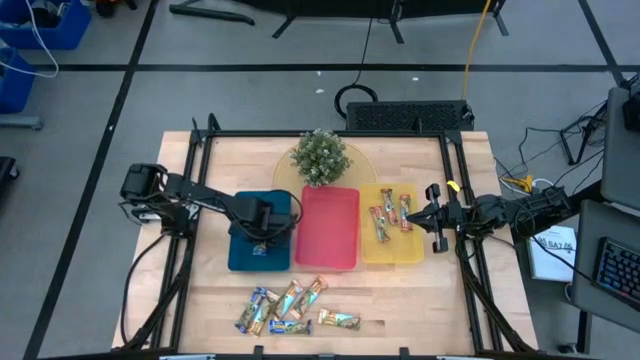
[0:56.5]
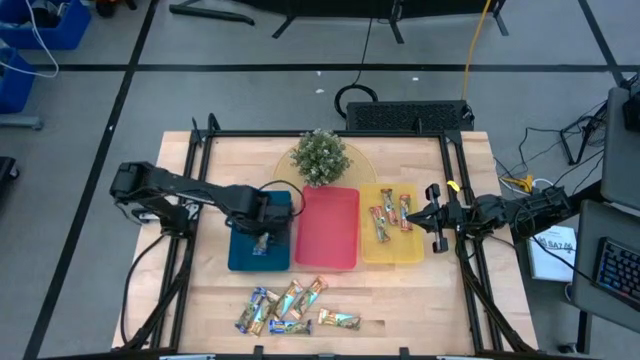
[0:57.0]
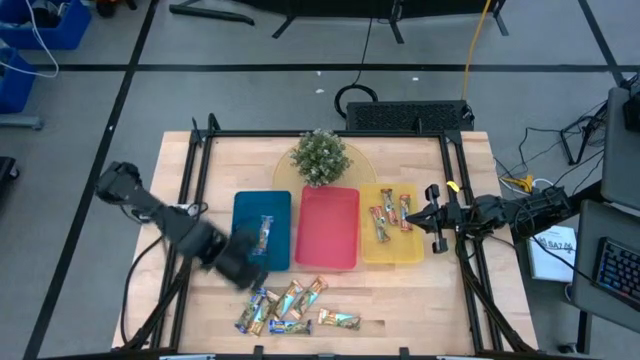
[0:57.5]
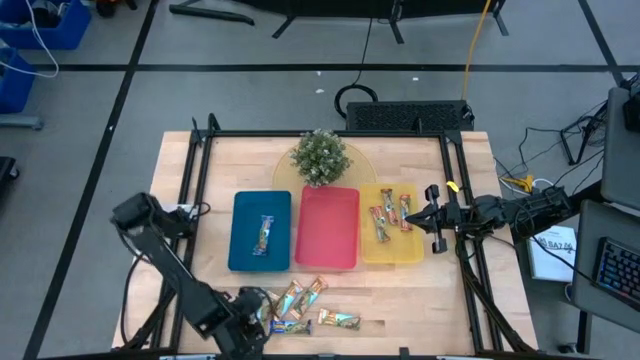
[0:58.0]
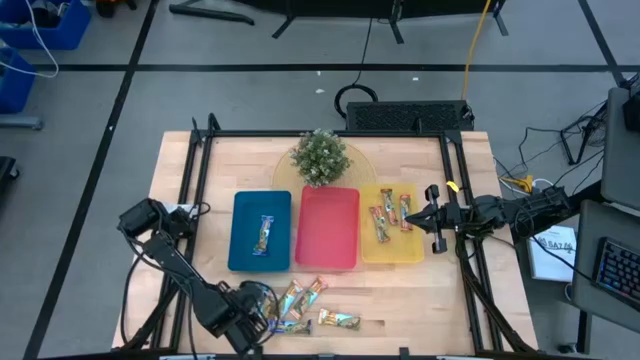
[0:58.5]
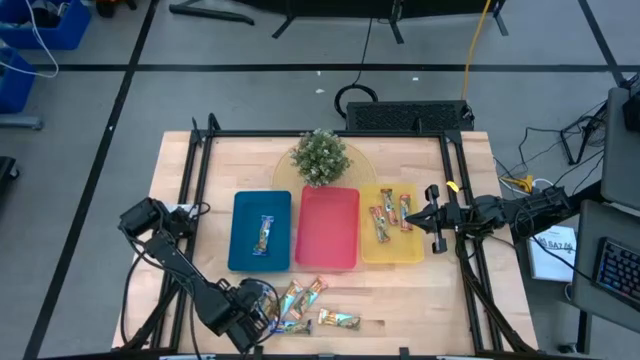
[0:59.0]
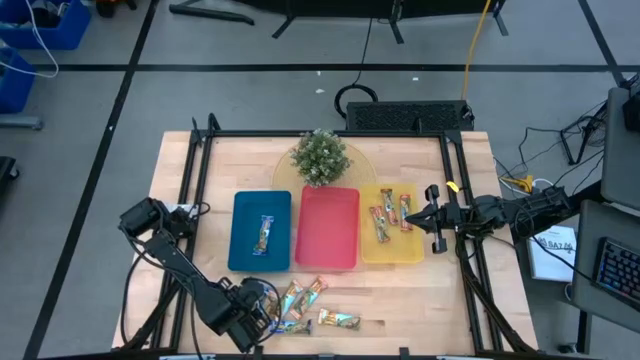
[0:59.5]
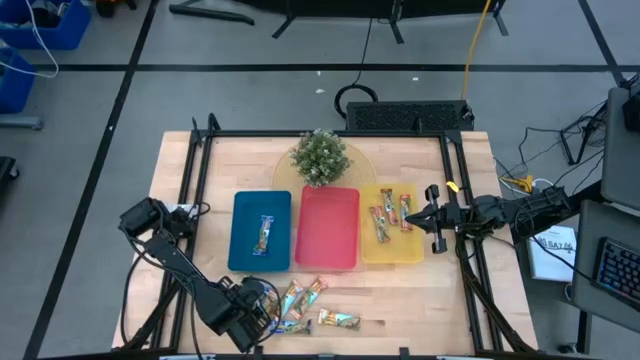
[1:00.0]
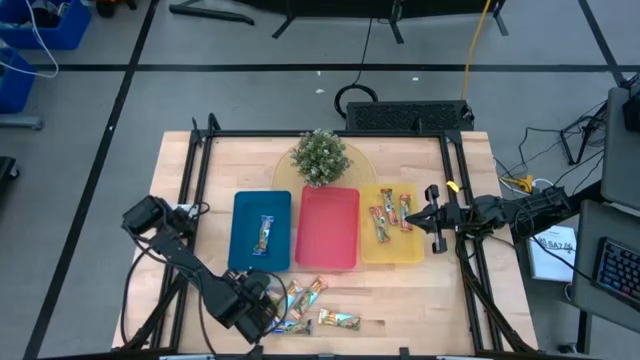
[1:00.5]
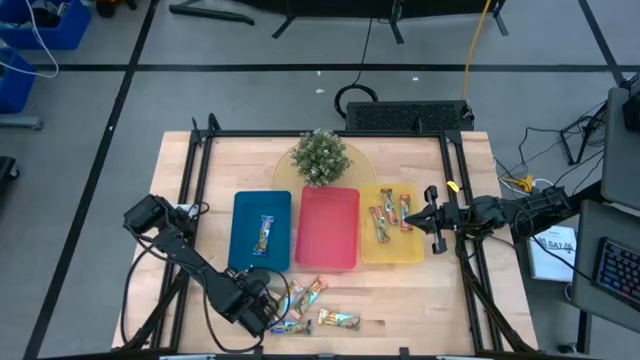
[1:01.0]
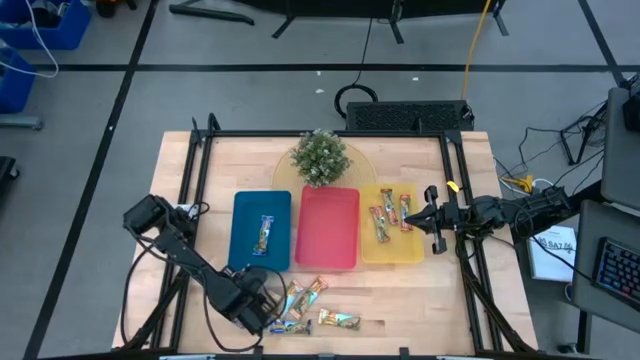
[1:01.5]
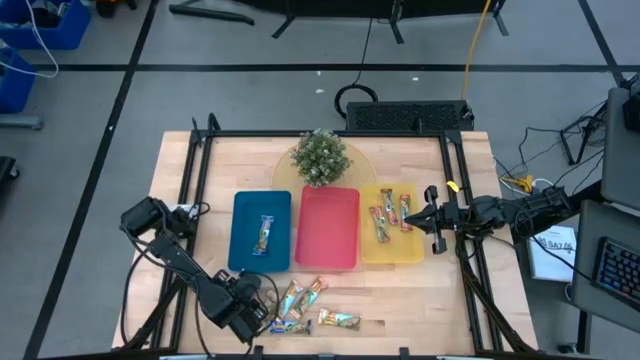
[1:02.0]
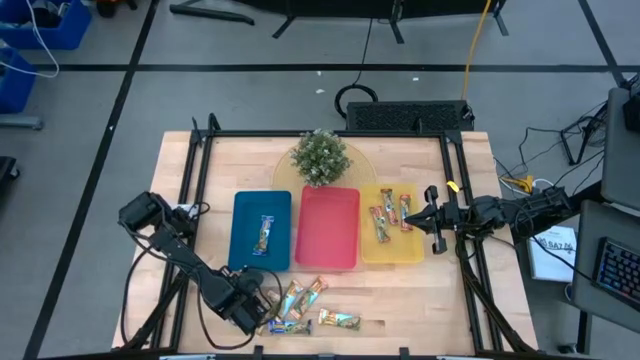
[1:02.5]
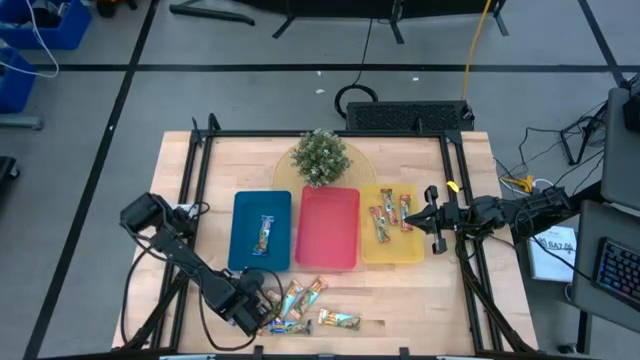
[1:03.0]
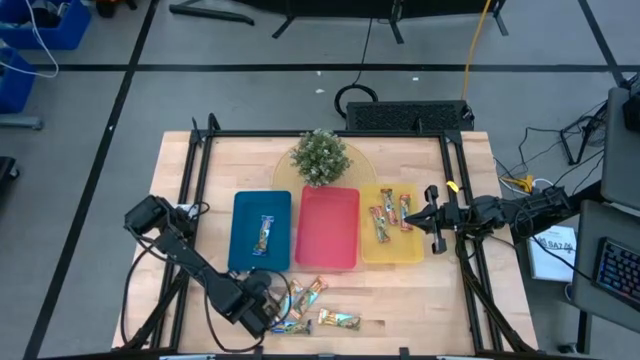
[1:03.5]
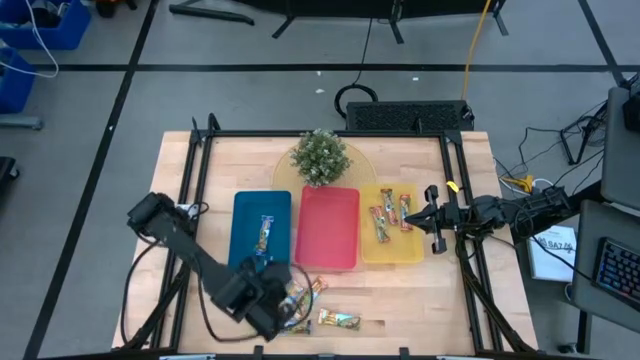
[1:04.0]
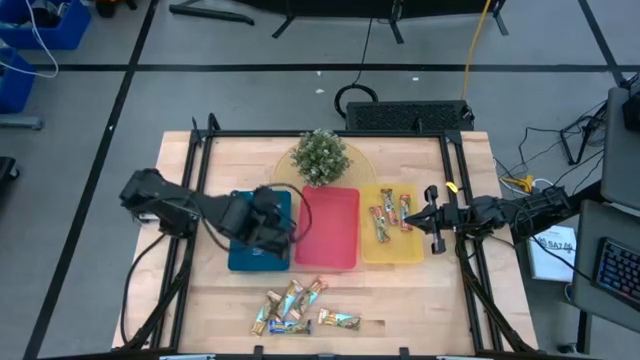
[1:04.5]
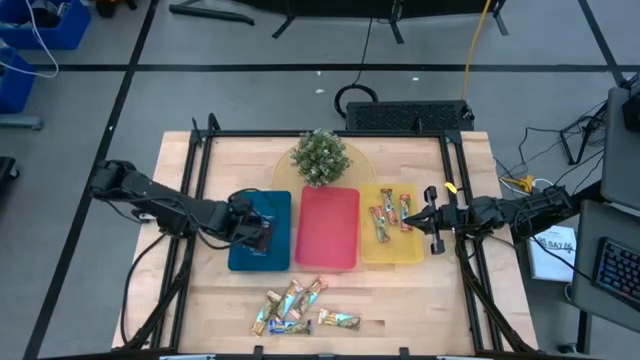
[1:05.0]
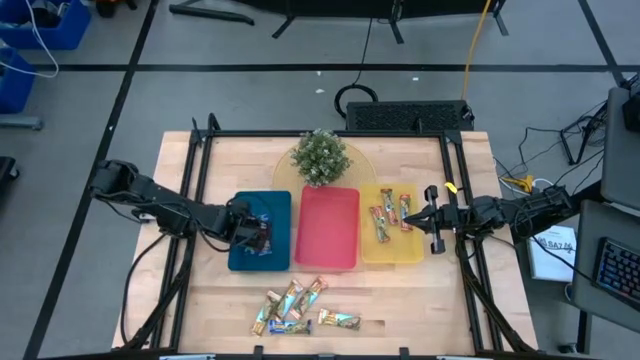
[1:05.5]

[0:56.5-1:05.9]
Task: Pick and place Granola Bars by type
Put the left blue granola bar into the blue bin

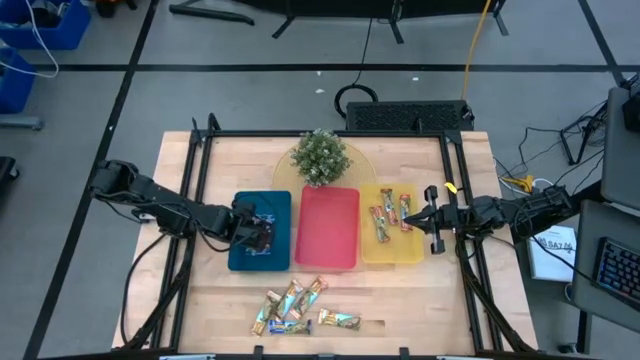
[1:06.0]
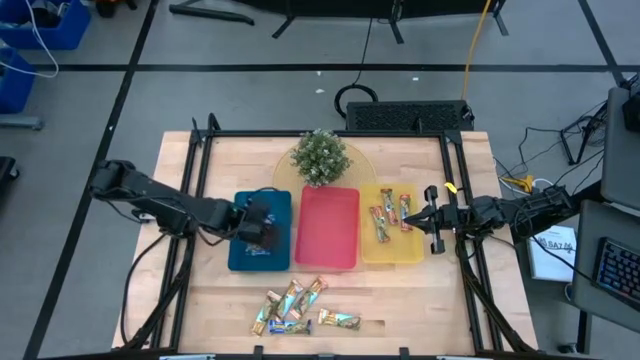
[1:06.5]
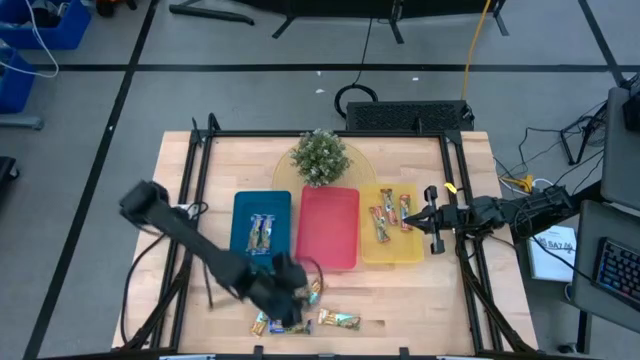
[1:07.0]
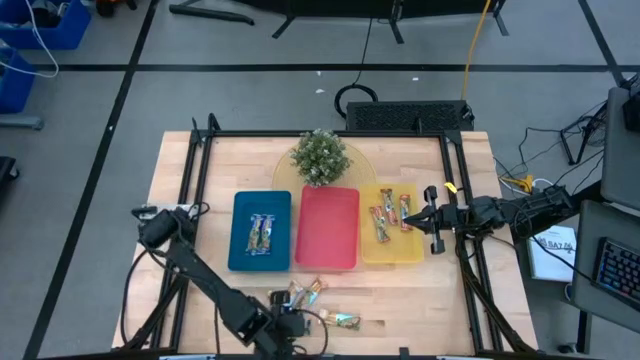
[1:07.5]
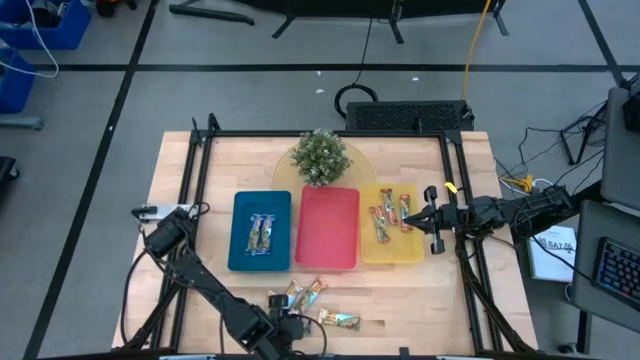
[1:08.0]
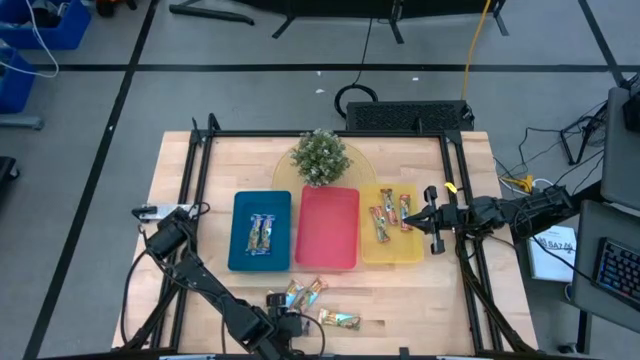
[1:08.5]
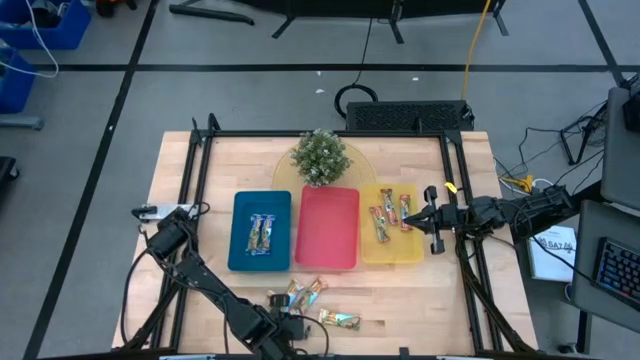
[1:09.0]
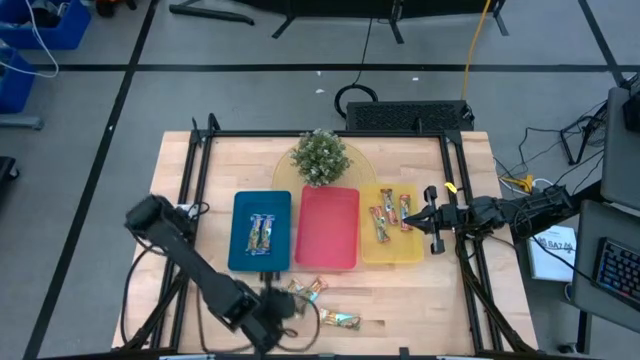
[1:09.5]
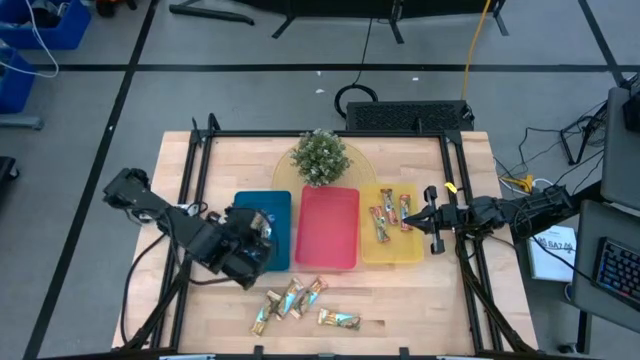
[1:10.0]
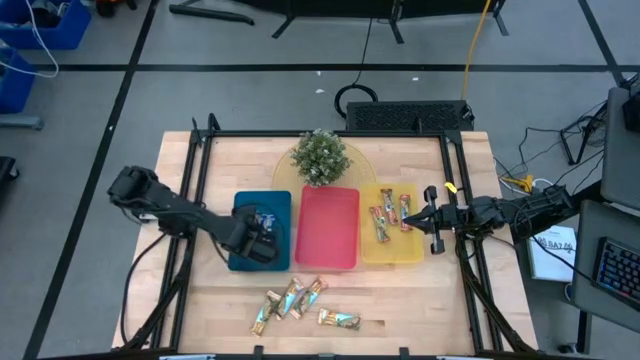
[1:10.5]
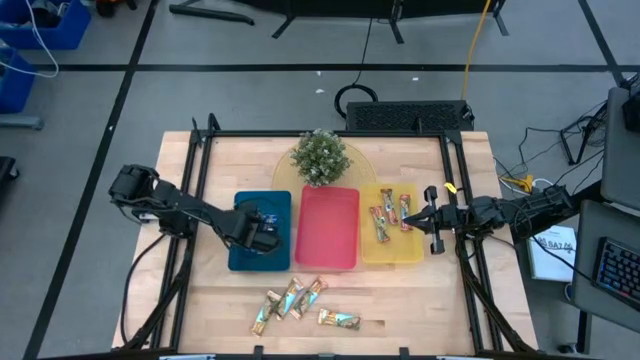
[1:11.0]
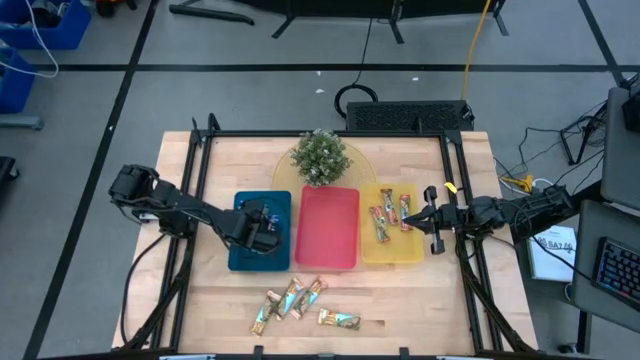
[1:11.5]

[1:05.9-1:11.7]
Put the blue granola bar into the blue bin

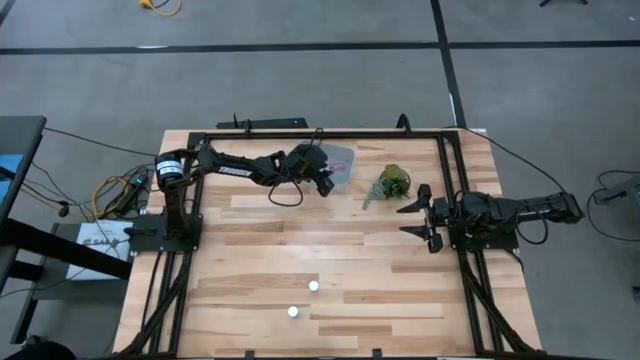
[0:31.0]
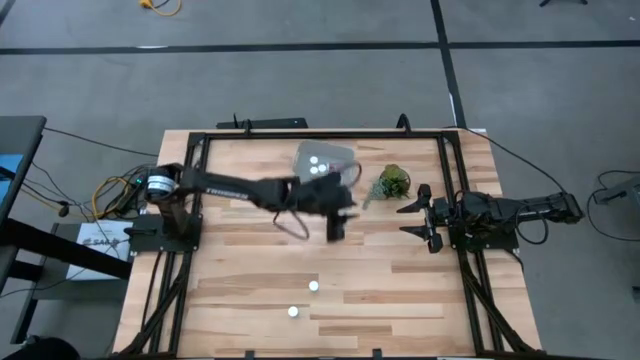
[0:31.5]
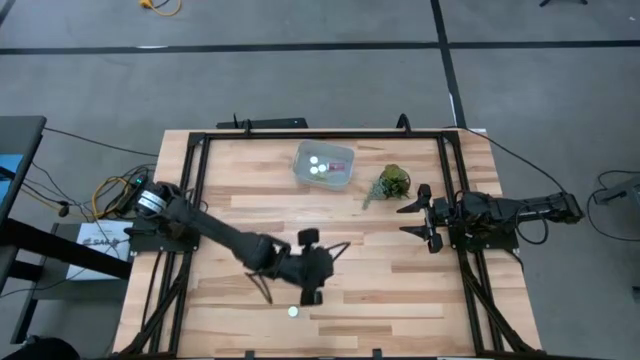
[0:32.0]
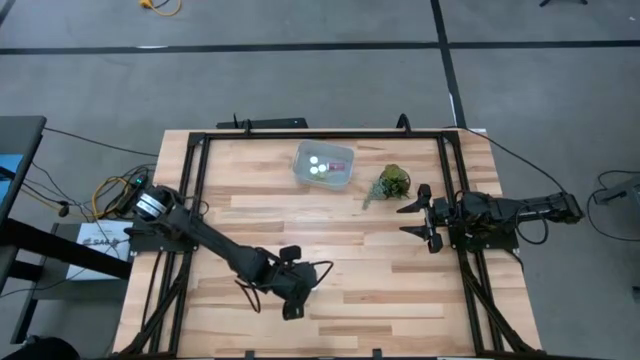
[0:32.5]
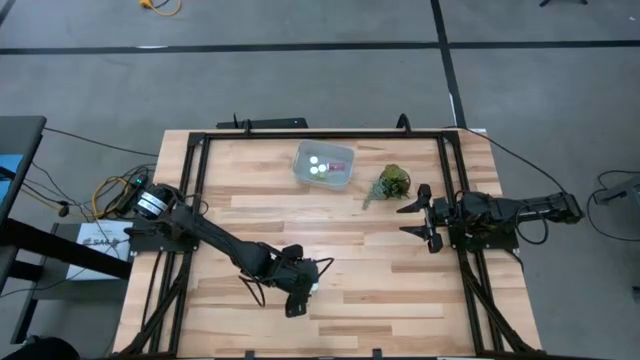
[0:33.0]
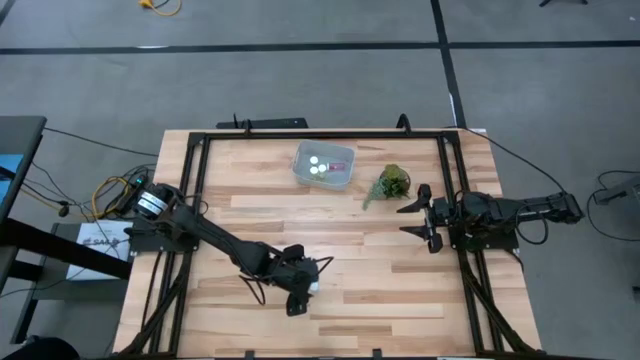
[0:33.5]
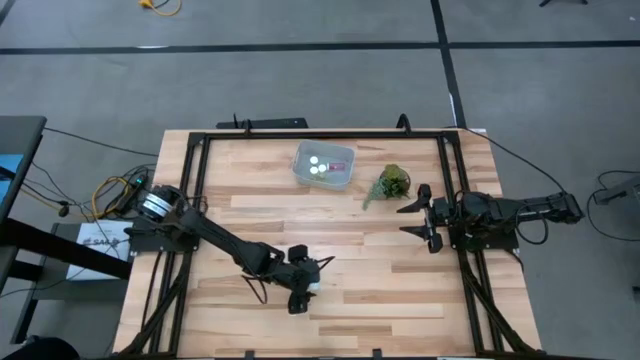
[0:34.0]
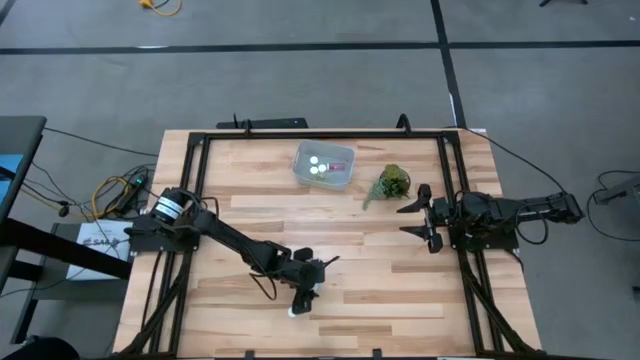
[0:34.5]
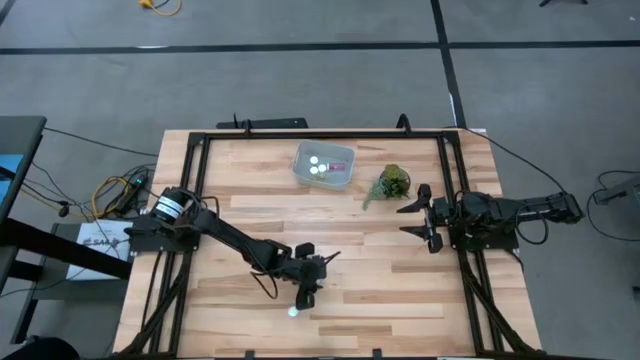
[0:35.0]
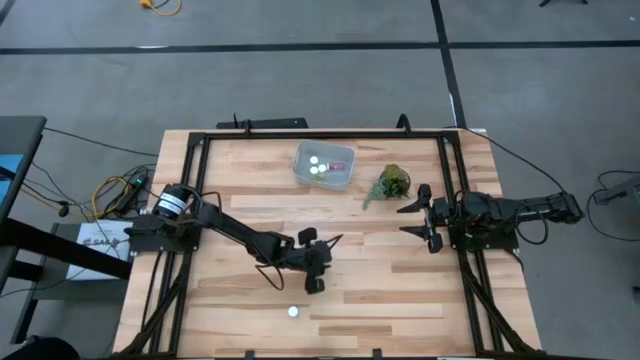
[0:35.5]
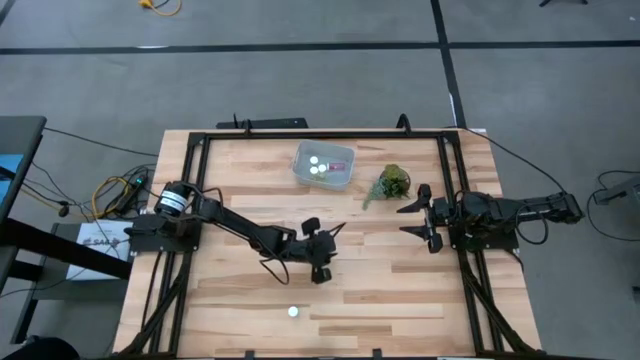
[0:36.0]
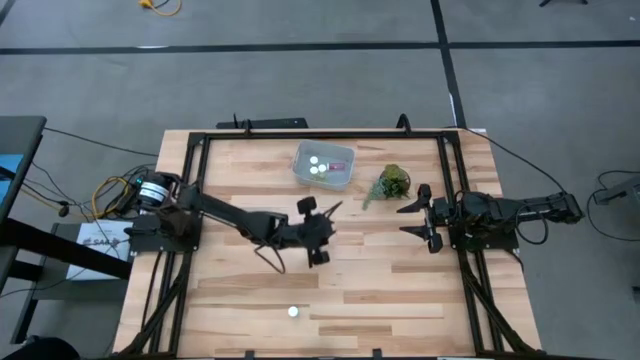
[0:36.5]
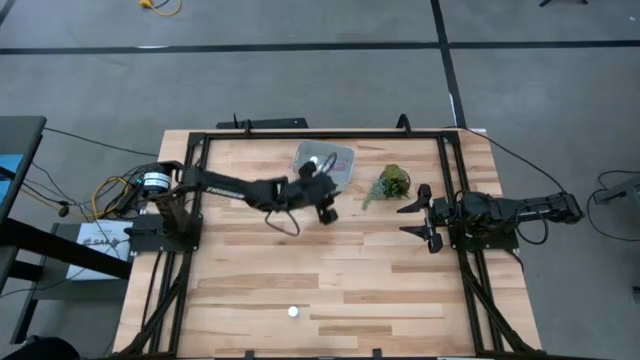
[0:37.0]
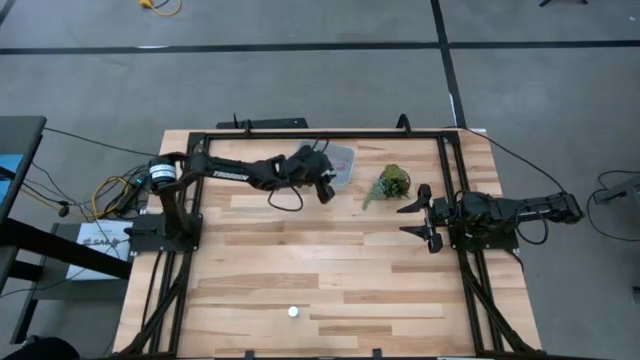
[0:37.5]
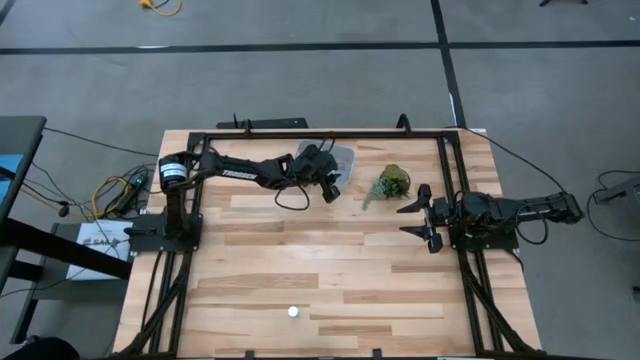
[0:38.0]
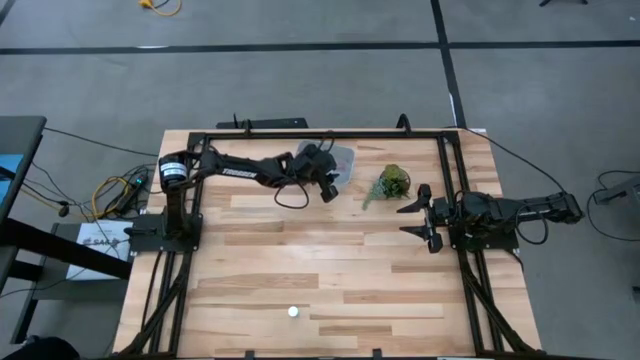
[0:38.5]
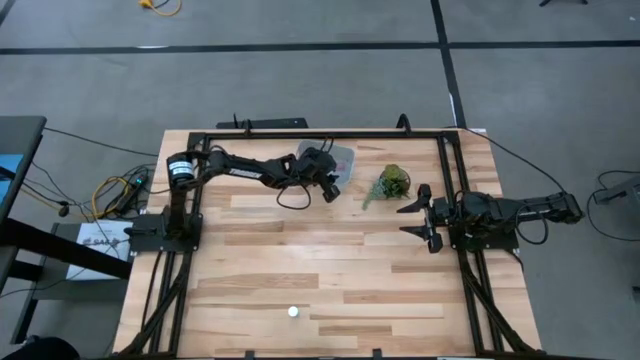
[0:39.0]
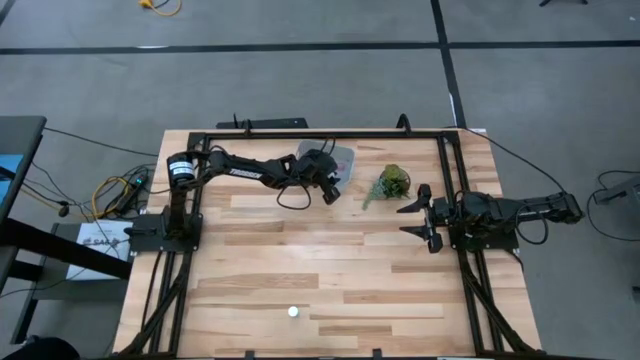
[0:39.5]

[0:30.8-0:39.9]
Task: Pick and place pill bottles into a basket
Put the top blue pill bottle into the gray bin
